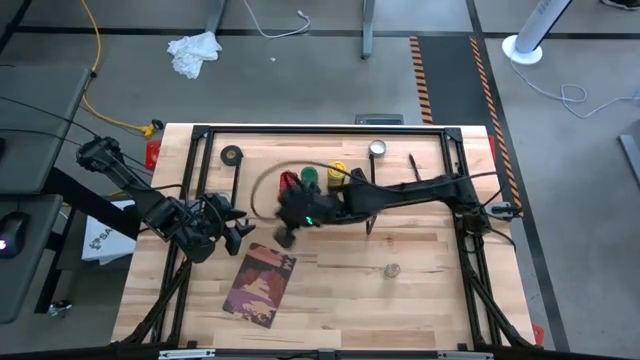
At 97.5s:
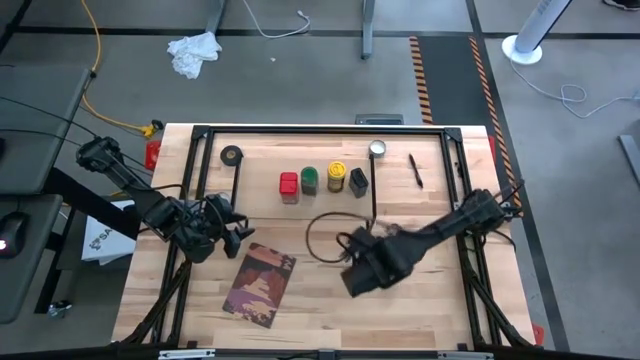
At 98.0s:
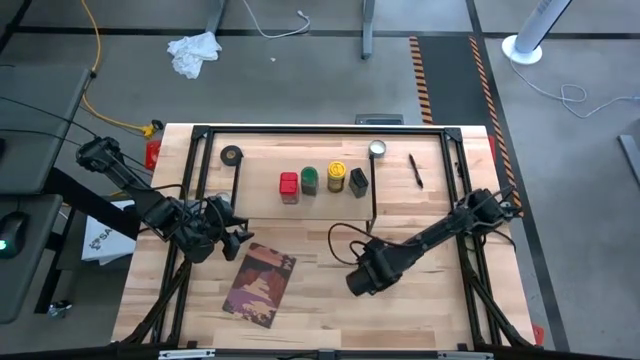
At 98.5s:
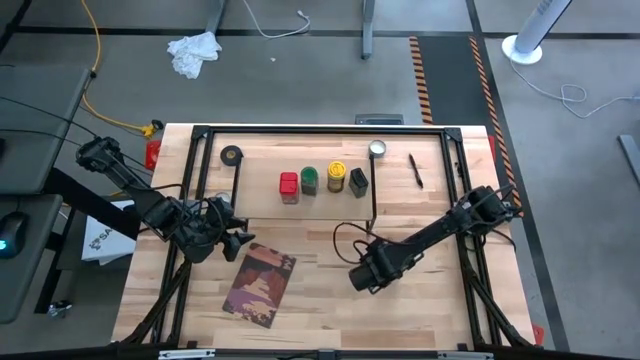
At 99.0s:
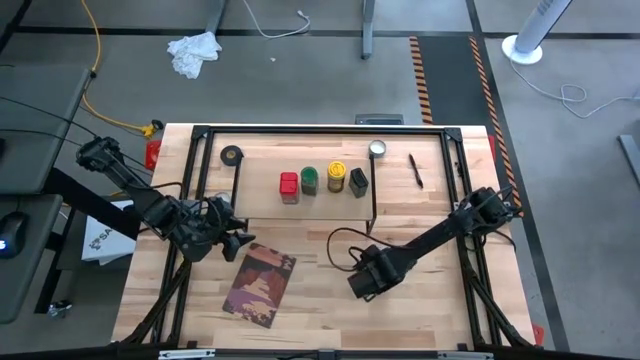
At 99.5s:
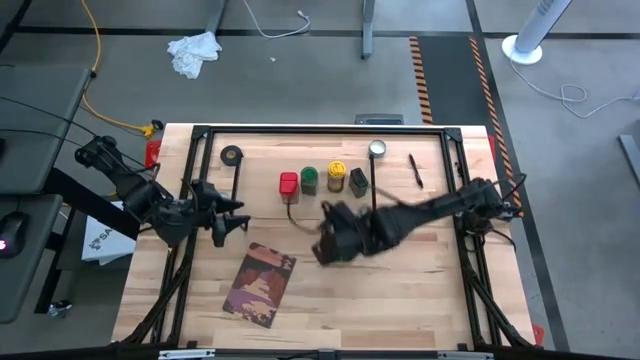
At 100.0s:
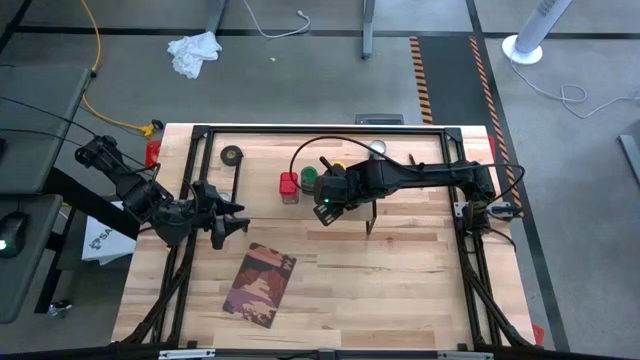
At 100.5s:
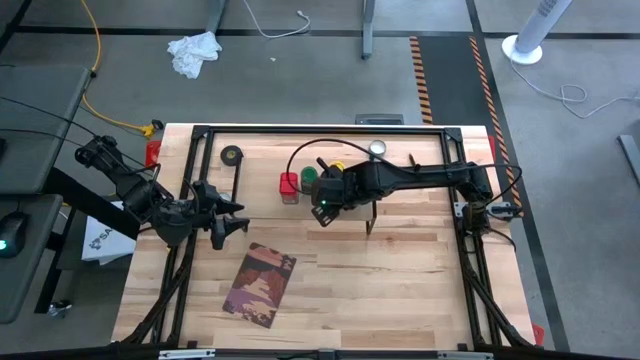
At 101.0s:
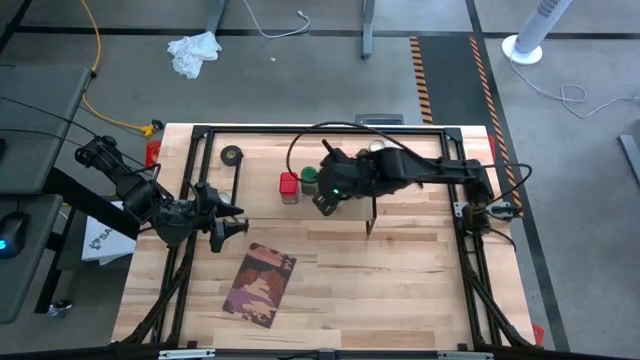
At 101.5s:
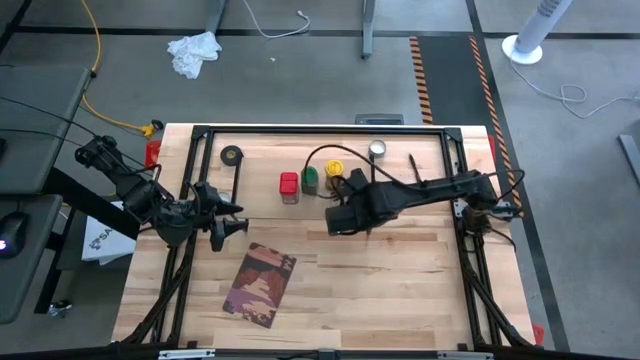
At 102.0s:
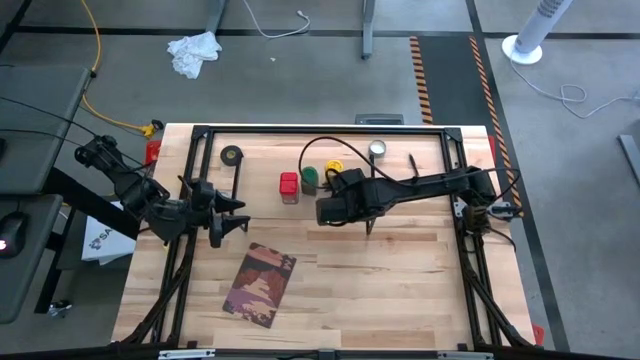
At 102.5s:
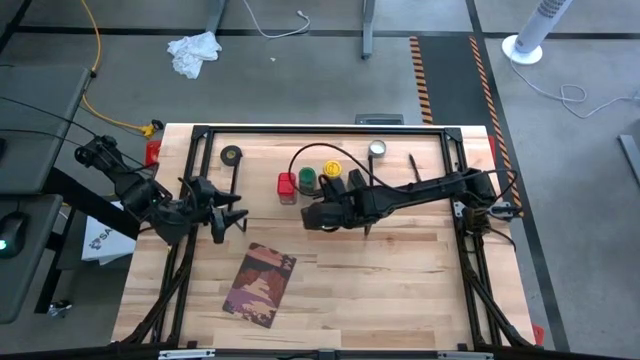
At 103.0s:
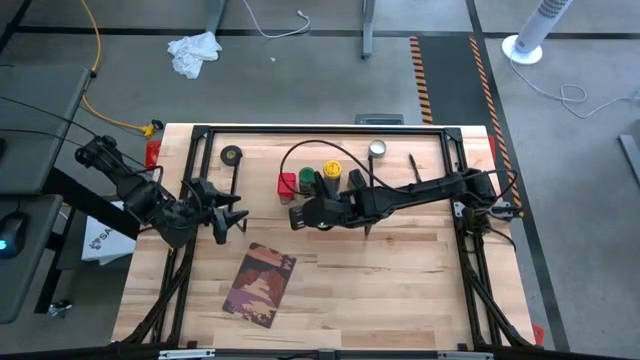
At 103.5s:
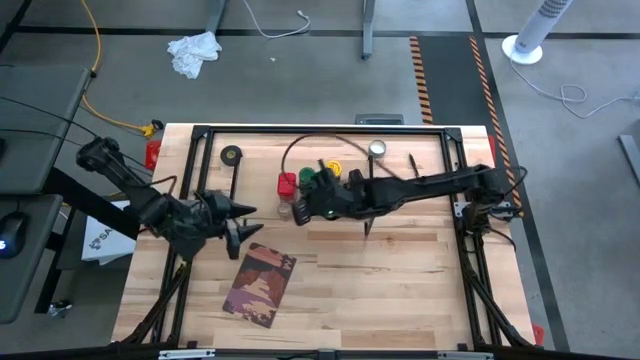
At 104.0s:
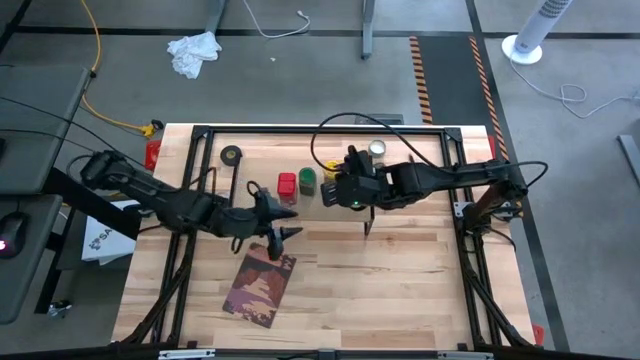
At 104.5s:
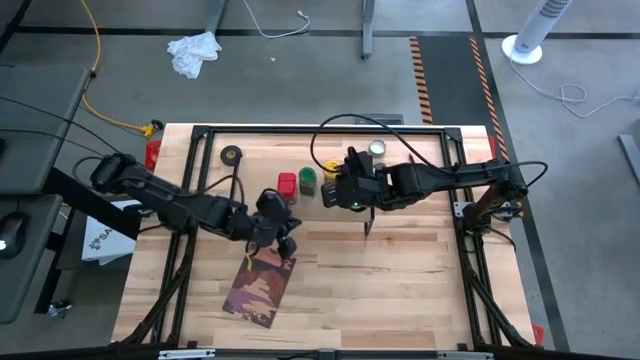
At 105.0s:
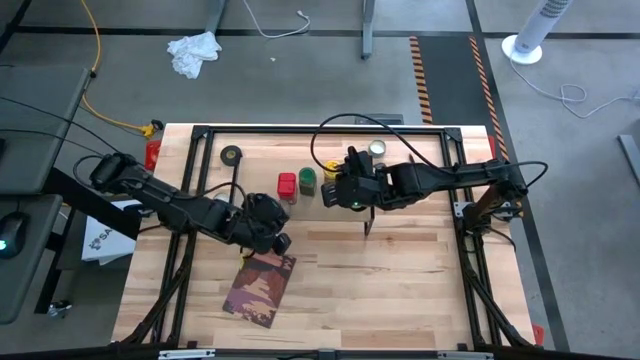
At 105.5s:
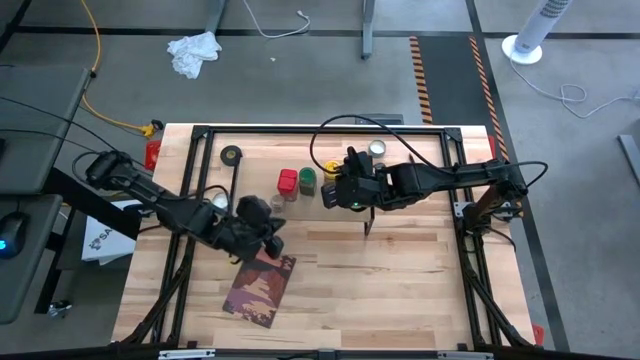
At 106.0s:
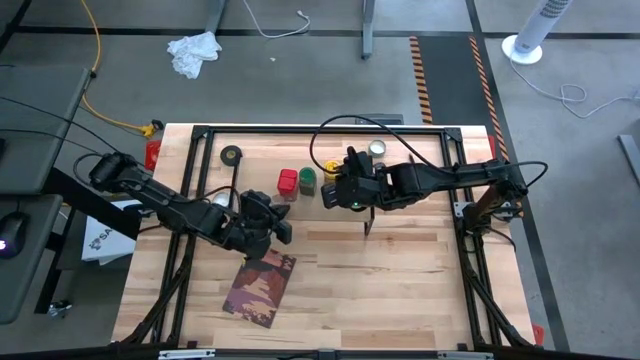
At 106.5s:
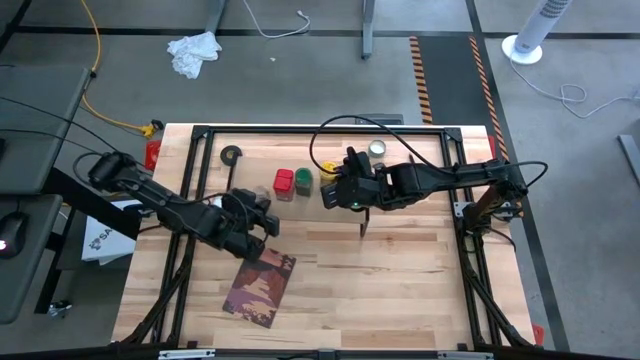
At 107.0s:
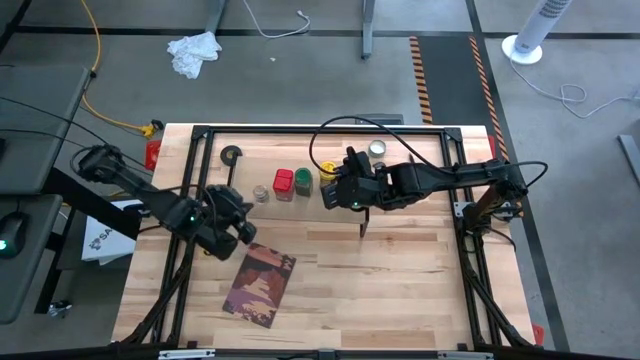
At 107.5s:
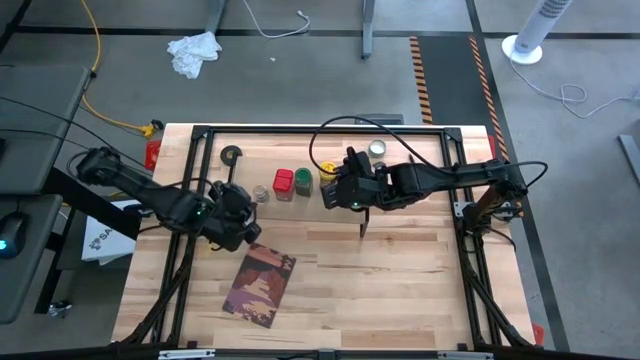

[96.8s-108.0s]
Task: Shelf spices
Put the transparent seasoning bottle on the shelf

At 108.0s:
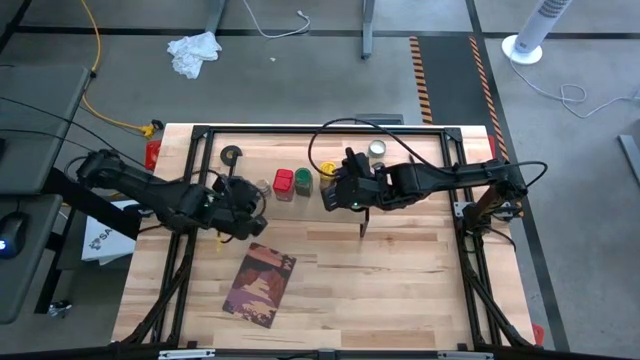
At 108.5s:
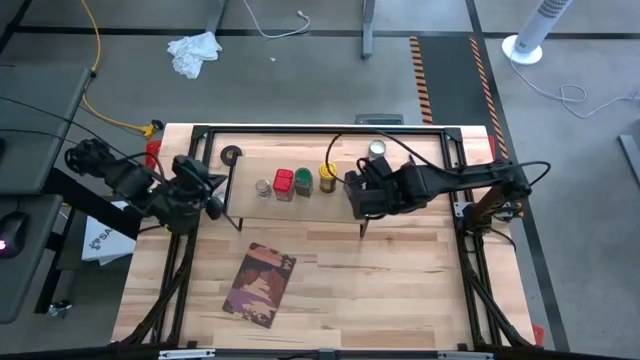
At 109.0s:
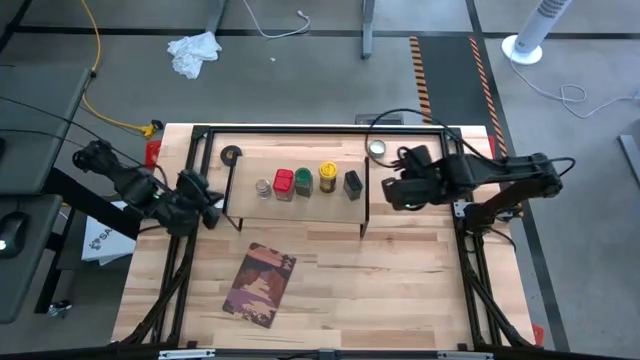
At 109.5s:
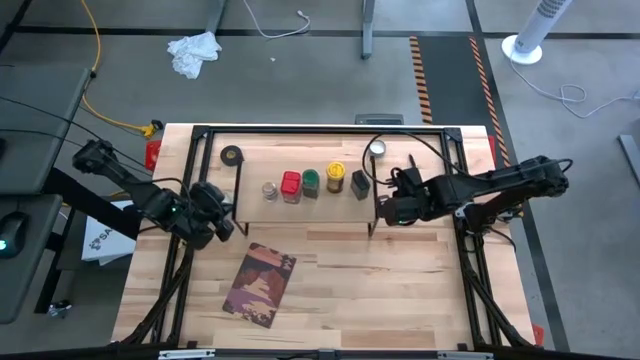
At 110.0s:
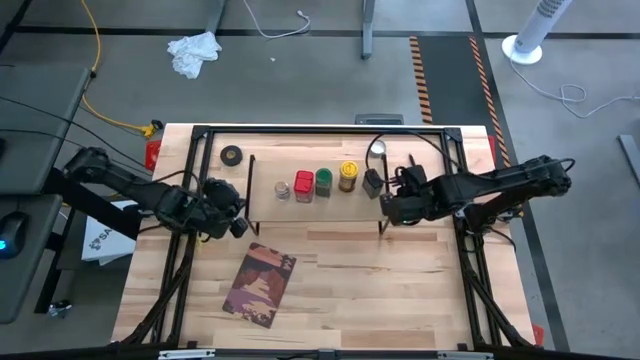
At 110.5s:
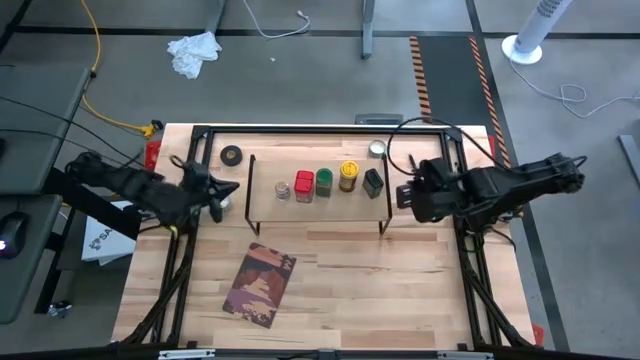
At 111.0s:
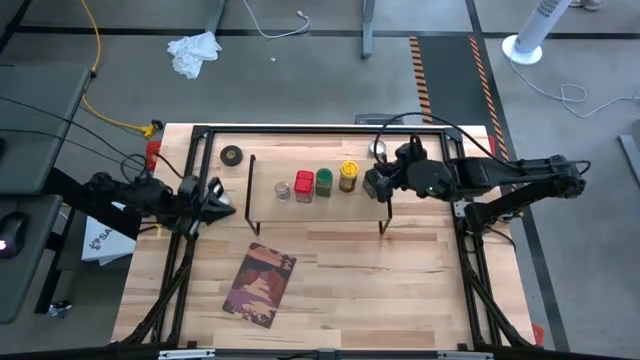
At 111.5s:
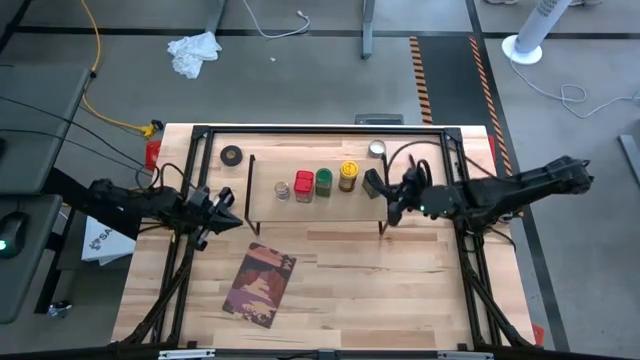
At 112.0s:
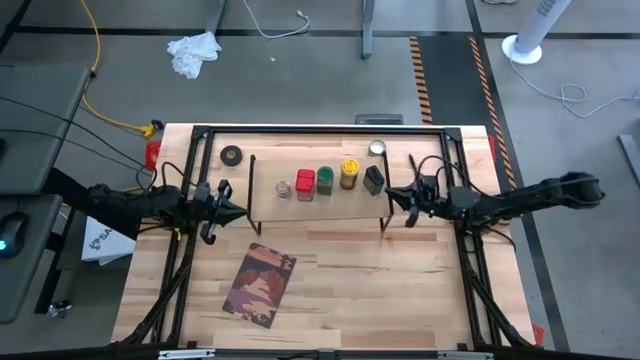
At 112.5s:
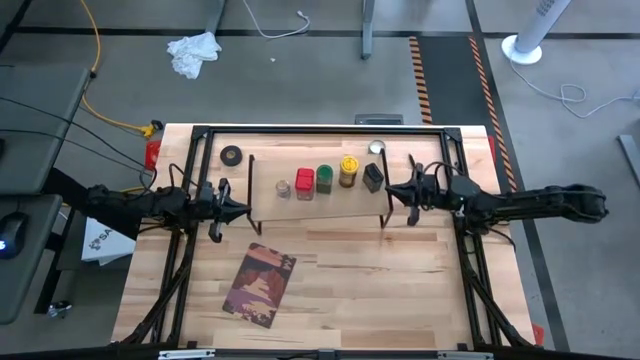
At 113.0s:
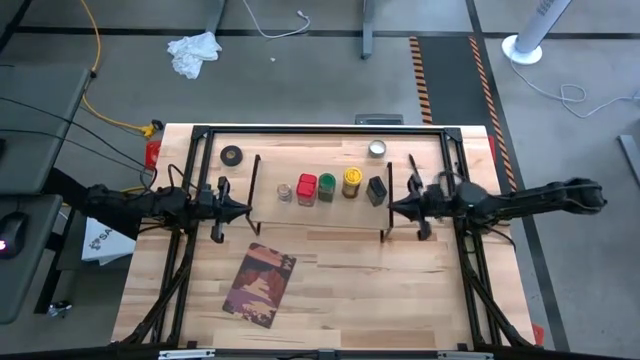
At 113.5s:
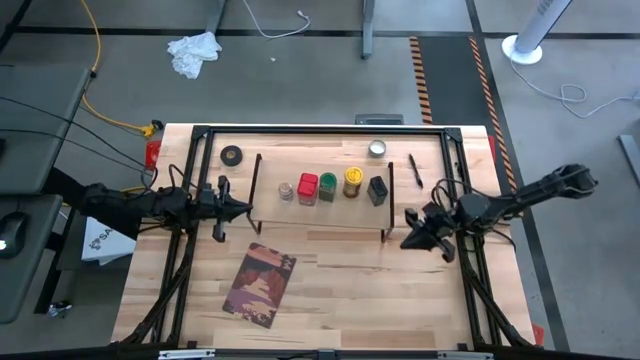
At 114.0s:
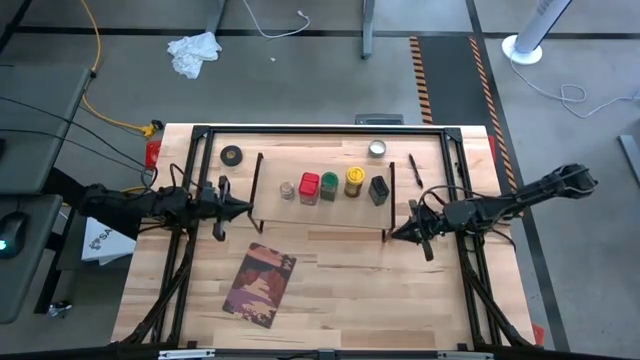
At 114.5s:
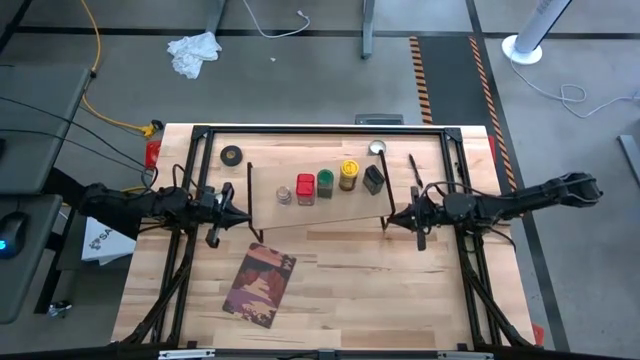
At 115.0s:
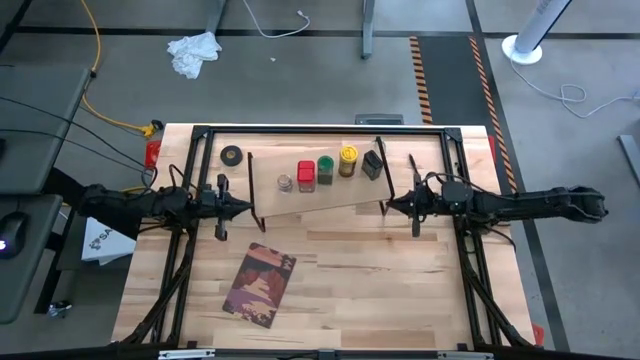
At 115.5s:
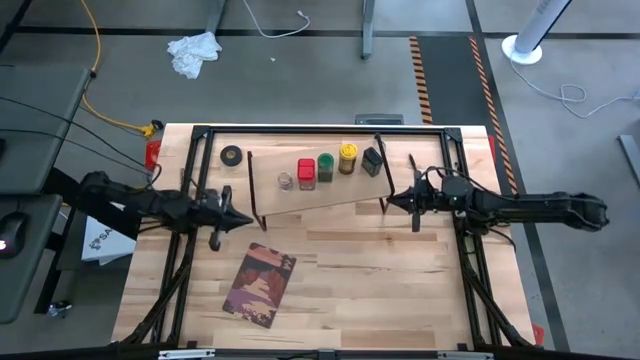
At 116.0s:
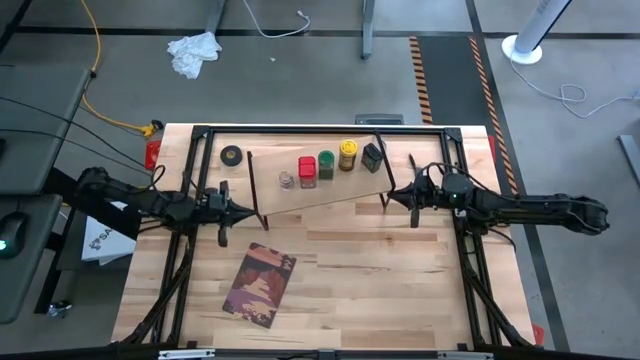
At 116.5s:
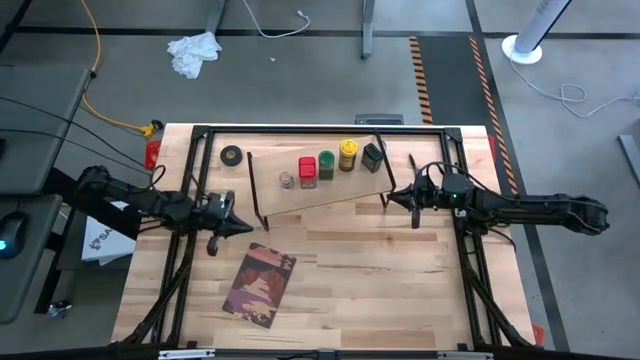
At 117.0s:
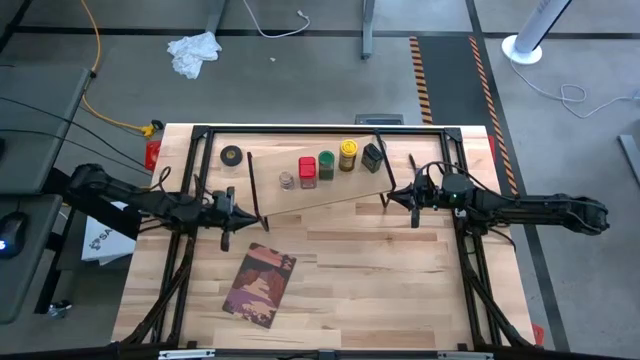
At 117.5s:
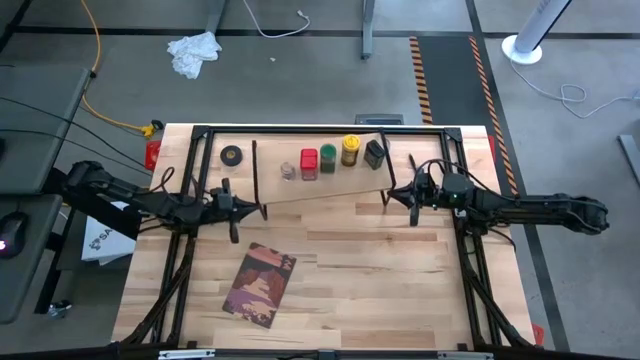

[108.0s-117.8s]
Adjust the shelf

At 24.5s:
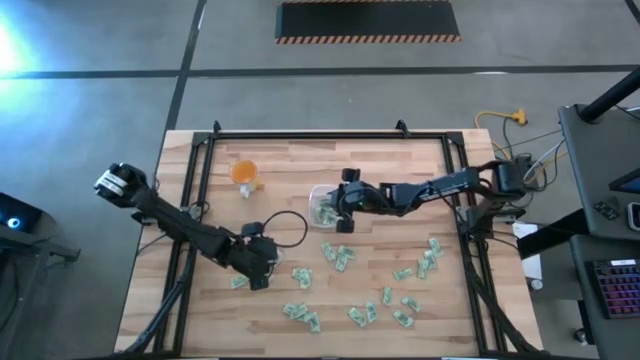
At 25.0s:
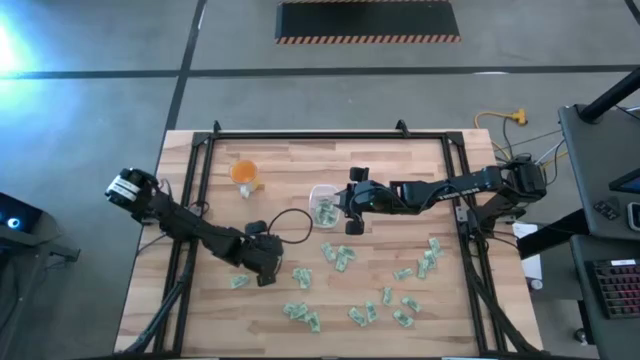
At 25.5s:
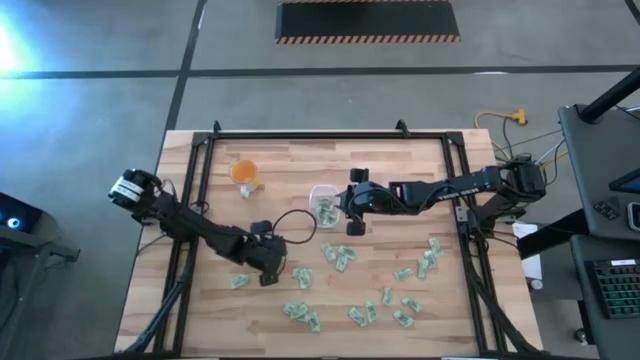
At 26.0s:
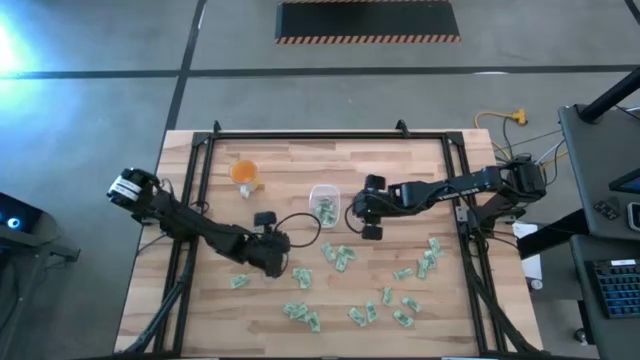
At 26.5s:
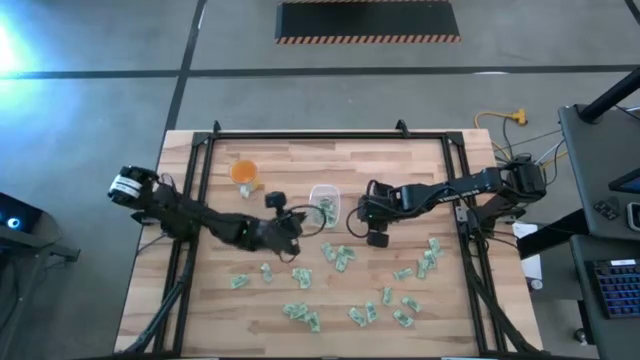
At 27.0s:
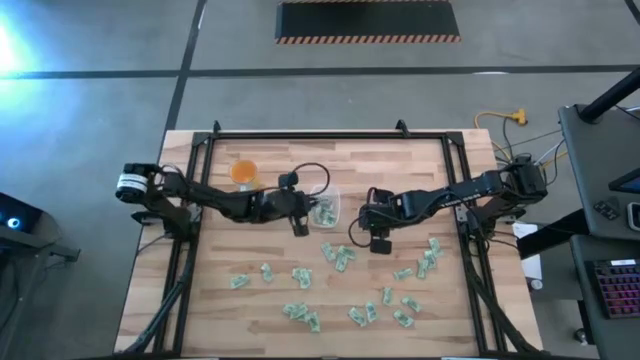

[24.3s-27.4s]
Task: Pick and place Stevia / Truvia into bins
Put the stevia packet into the bin
